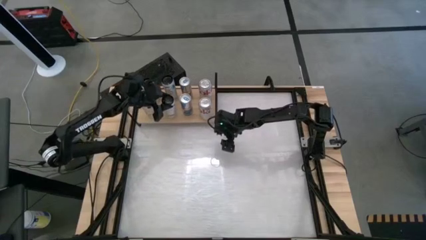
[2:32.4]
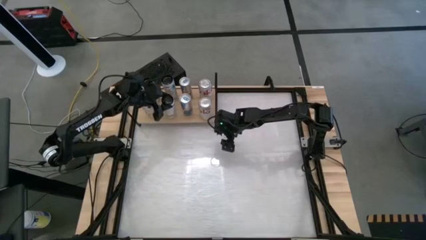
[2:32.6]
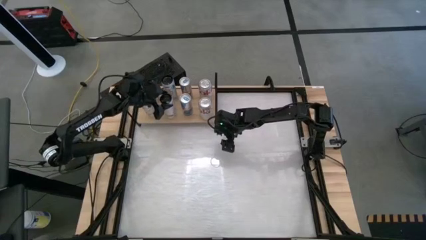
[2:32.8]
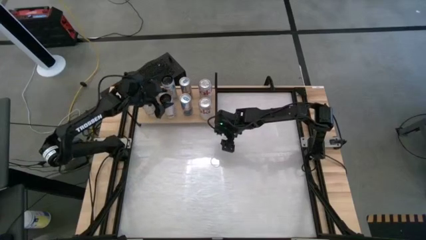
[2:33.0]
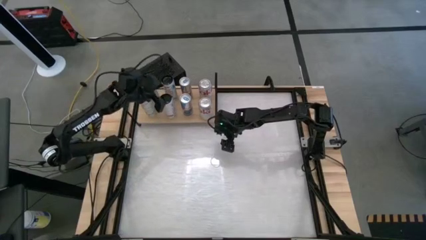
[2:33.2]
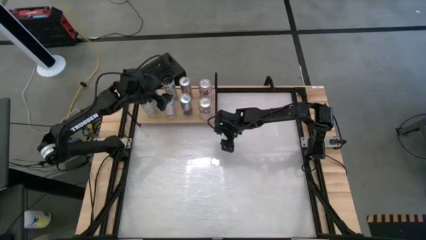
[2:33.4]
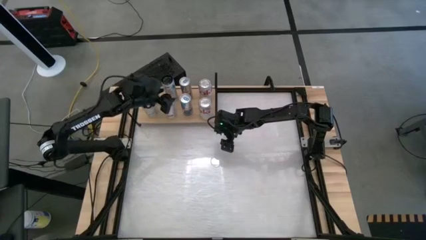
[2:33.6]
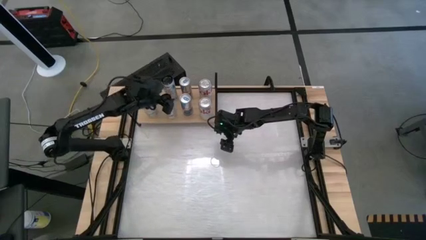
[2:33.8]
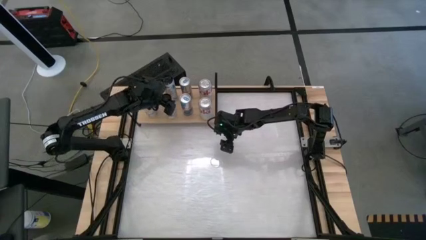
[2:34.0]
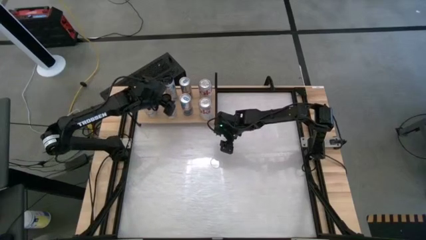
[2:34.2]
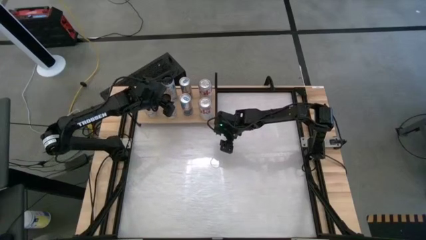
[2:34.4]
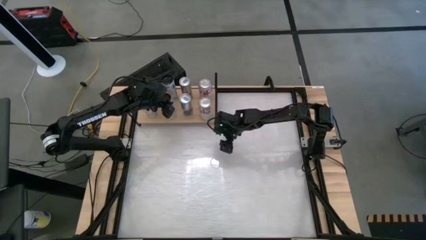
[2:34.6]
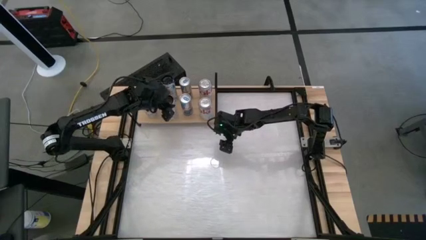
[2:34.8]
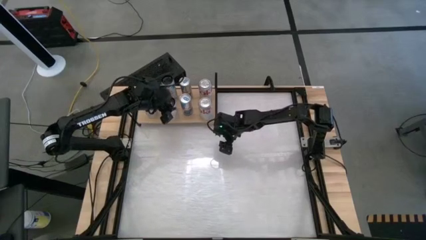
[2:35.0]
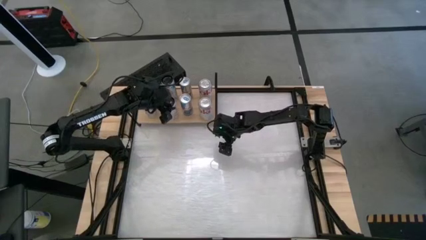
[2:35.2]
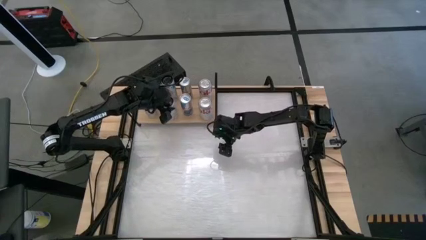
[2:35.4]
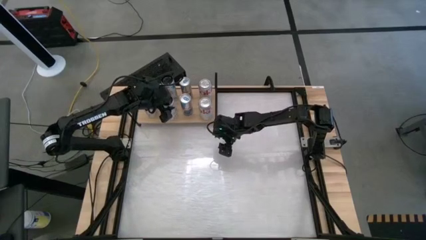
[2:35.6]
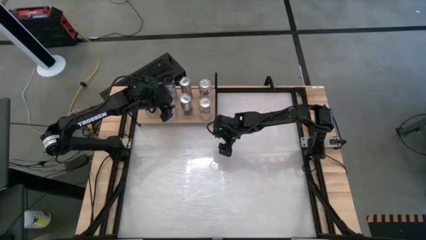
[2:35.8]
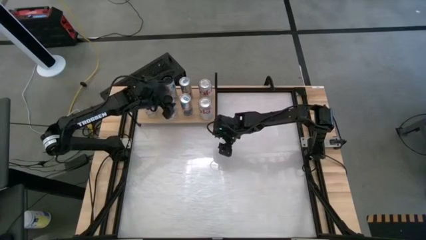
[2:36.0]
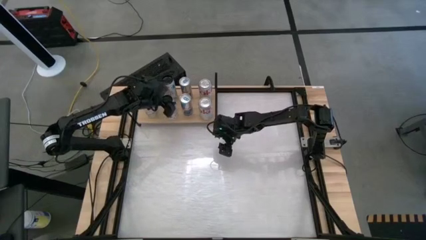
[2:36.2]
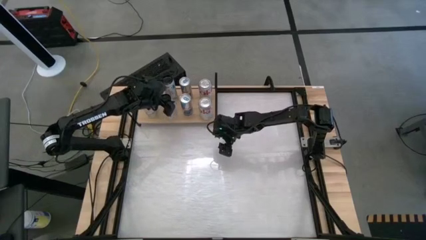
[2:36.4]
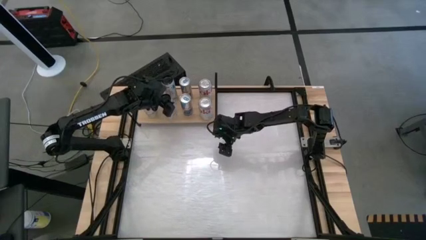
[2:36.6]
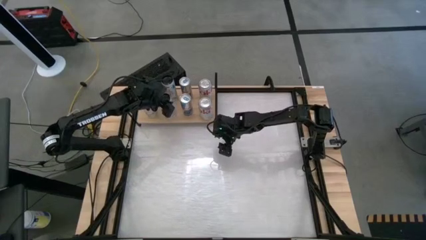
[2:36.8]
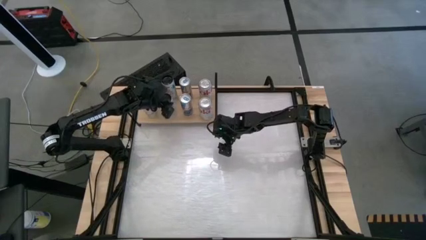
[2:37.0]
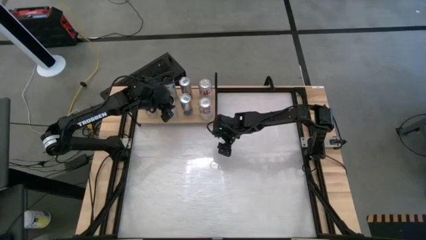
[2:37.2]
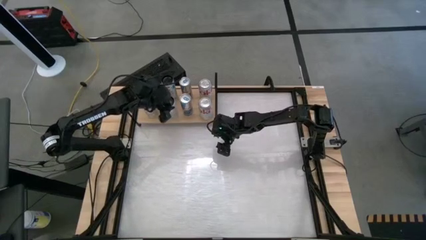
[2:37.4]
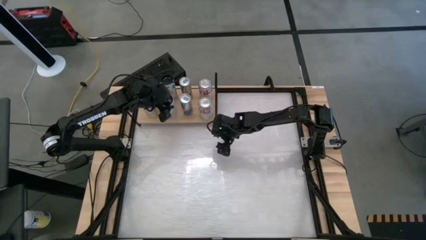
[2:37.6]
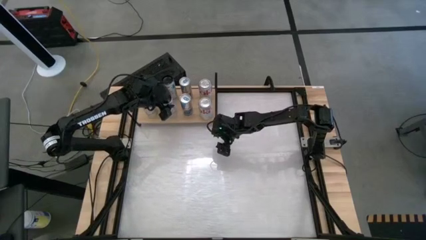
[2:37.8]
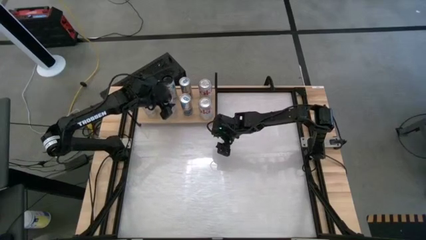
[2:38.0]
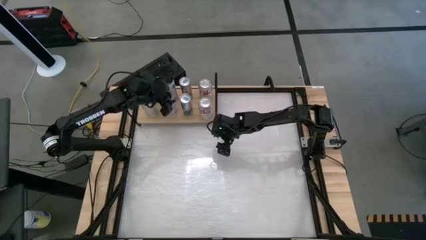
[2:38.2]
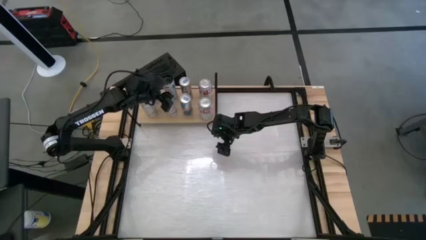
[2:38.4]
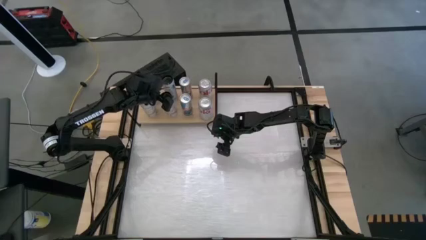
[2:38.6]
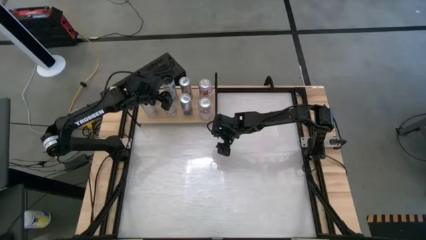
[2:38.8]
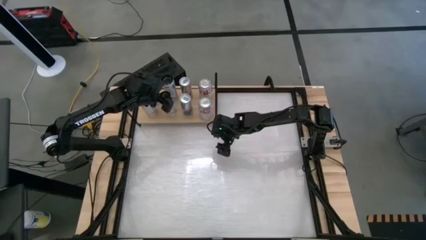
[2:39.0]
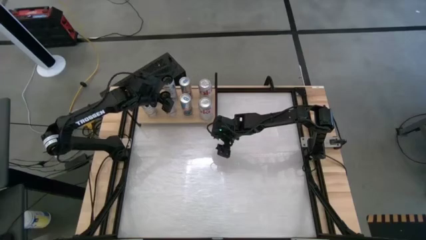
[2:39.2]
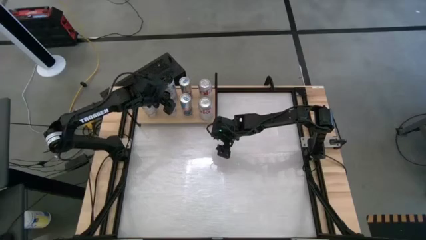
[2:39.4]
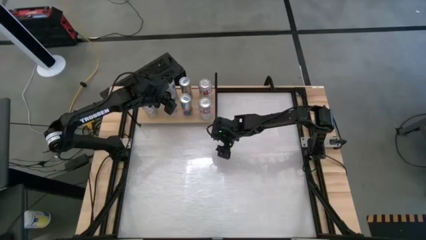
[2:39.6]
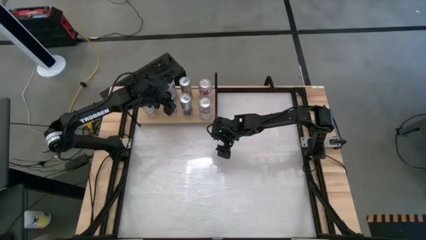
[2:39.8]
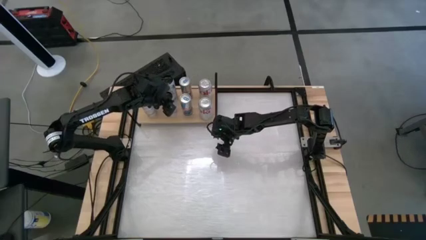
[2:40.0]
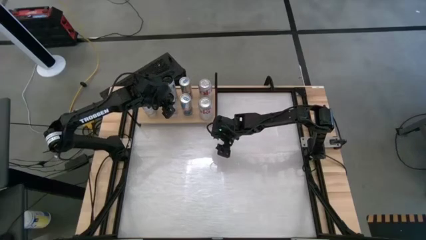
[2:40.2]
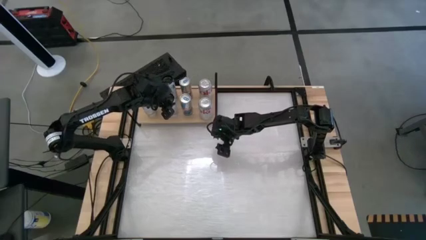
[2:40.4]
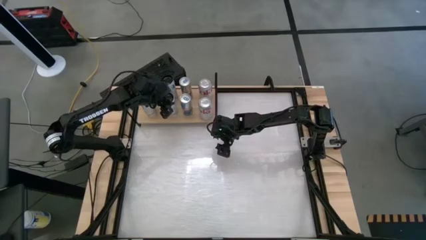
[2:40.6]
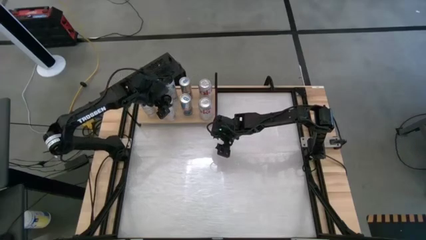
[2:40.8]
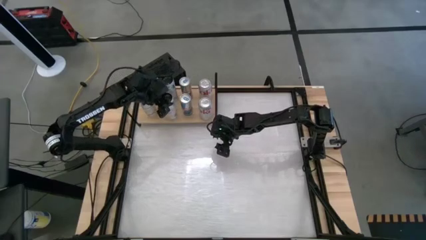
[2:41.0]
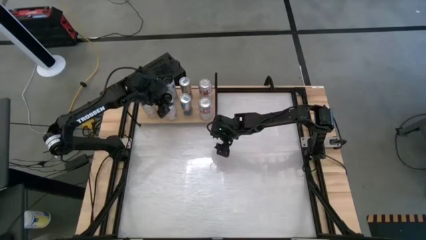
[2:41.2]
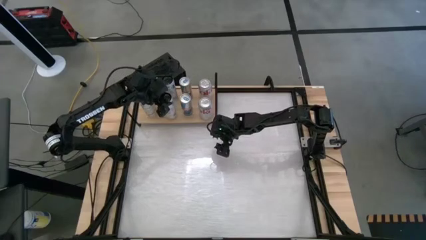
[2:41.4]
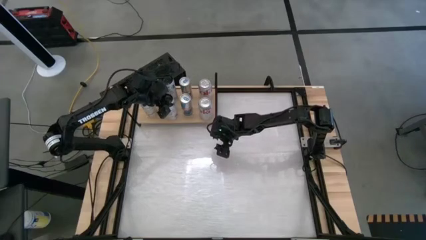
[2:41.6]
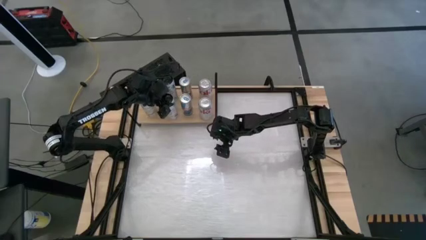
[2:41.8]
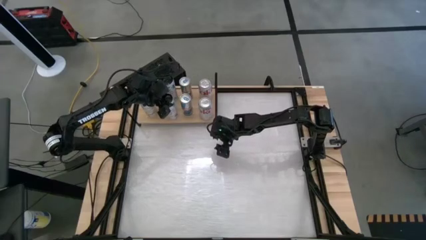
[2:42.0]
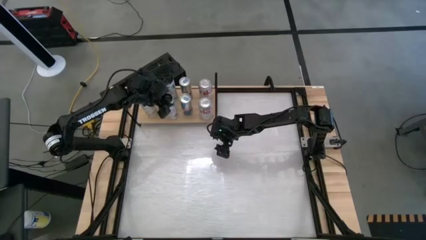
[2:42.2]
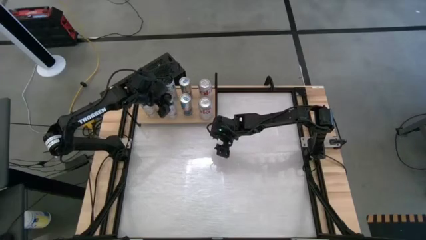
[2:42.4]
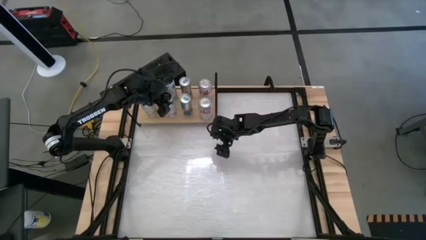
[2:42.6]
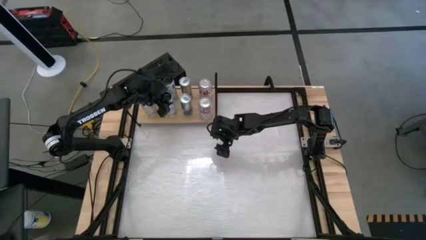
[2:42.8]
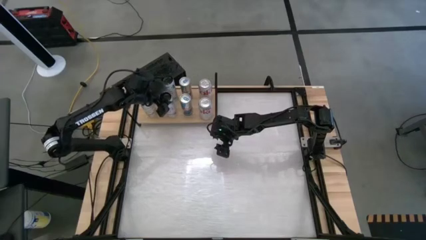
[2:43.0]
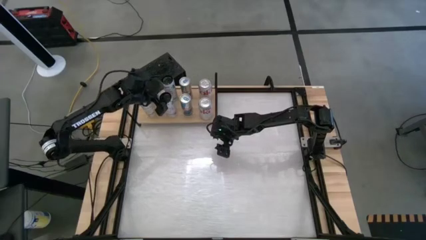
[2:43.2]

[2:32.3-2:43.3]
Task: Place canned beverage on shelf
Put the pink soda can on the shelf aligned with the other pink soda can

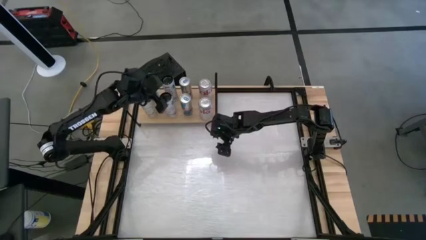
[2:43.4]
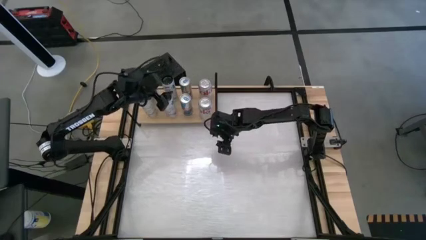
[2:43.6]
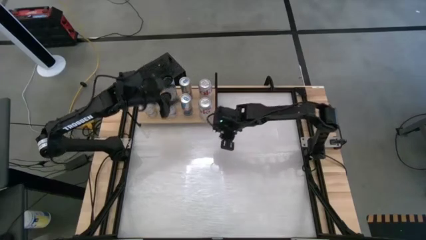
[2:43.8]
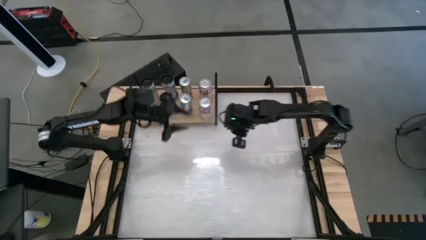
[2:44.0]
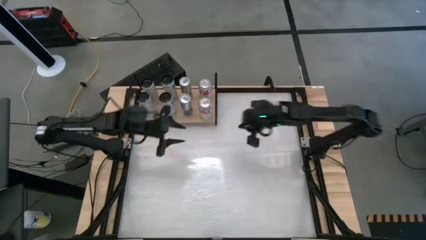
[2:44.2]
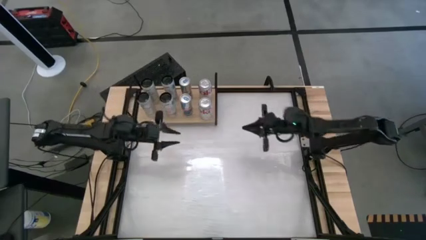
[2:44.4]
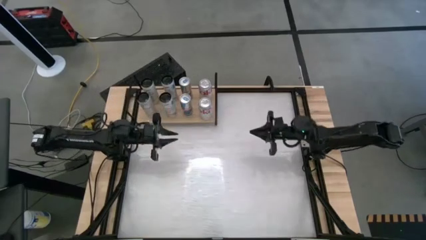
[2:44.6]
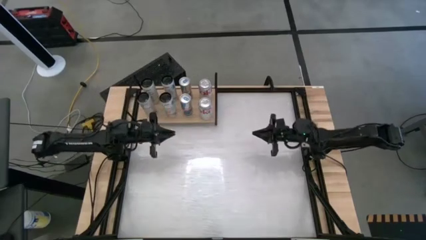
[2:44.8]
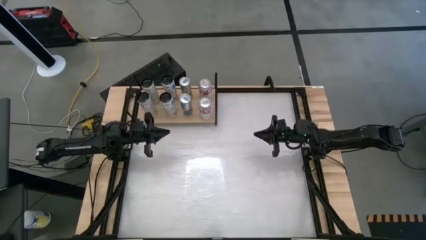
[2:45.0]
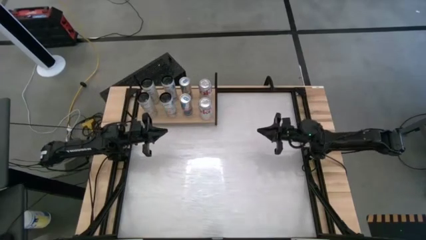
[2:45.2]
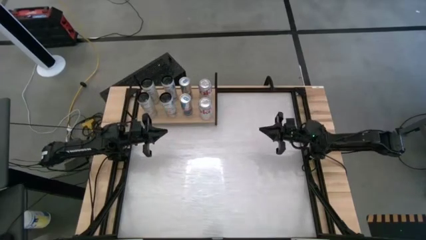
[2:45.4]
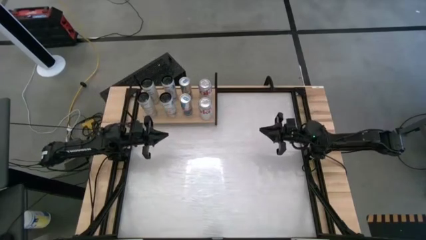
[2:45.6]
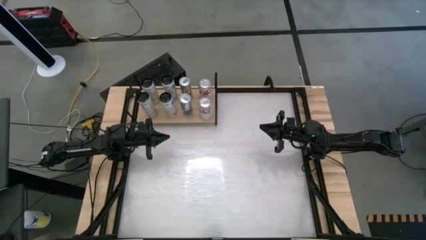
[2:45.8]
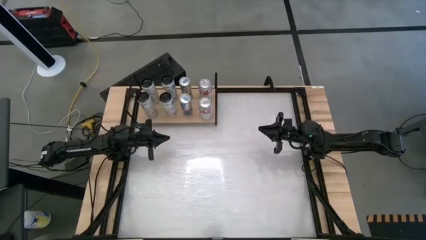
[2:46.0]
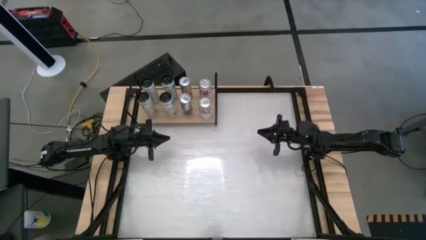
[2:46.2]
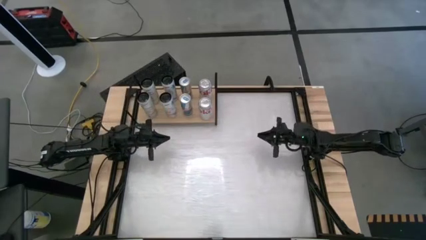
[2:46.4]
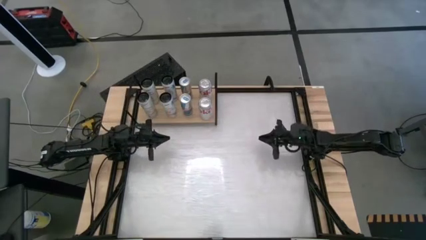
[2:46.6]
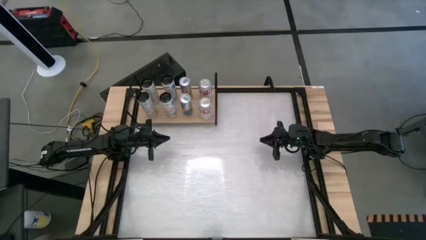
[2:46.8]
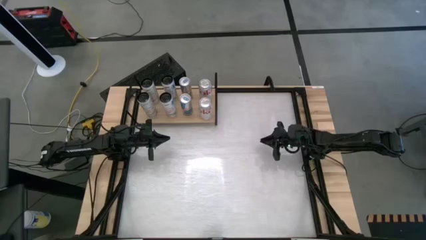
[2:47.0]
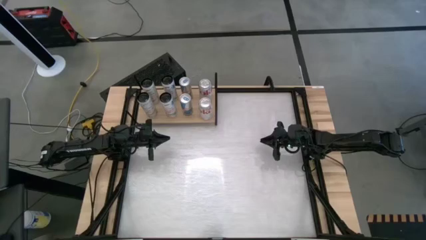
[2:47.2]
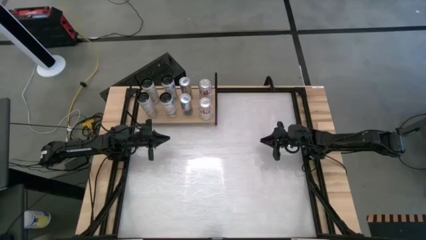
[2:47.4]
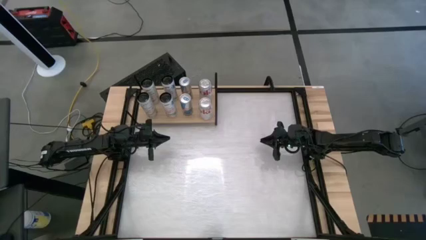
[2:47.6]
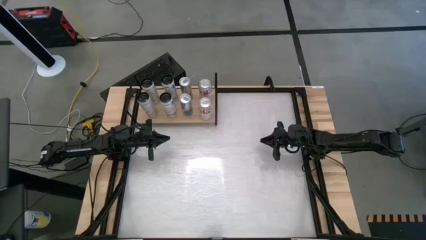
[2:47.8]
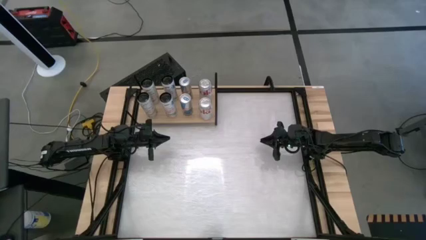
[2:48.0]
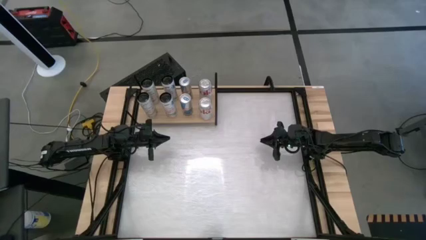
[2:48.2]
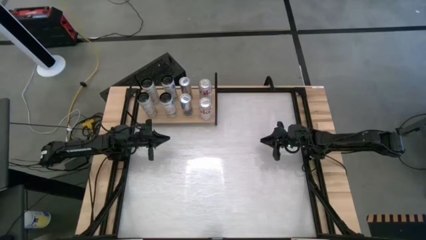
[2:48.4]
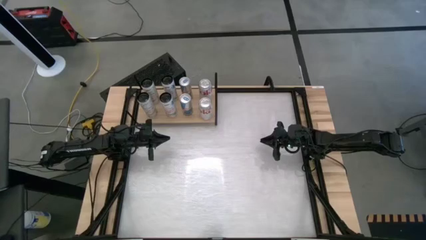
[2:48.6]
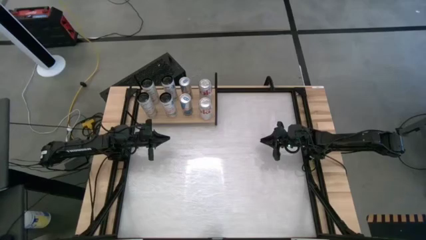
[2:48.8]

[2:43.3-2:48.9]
Return to Home Position
